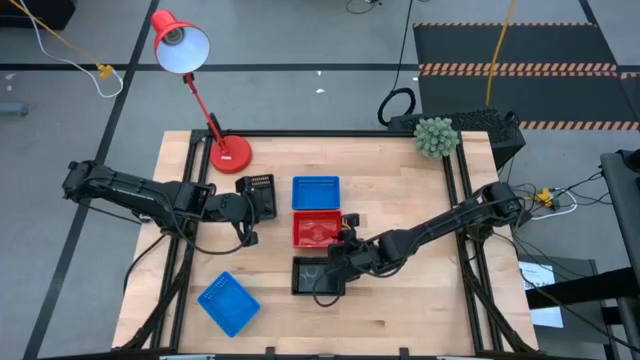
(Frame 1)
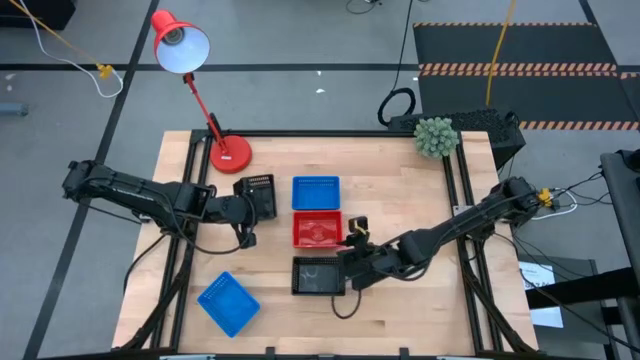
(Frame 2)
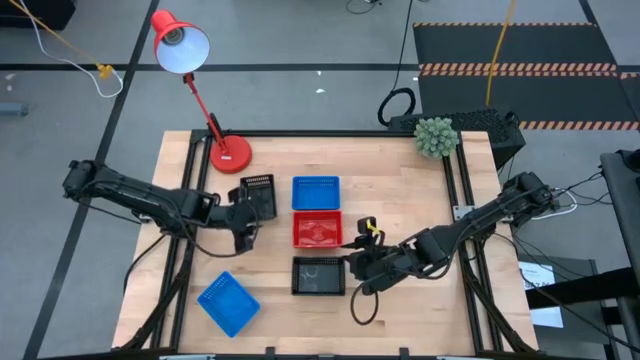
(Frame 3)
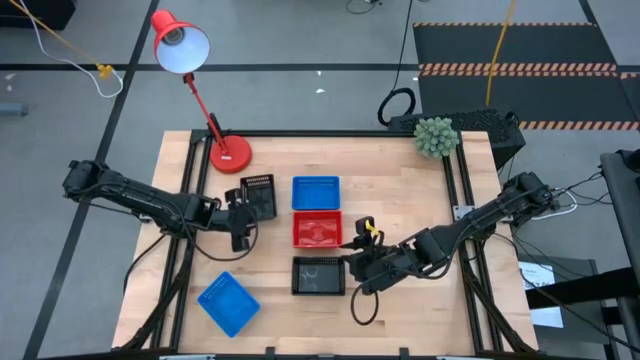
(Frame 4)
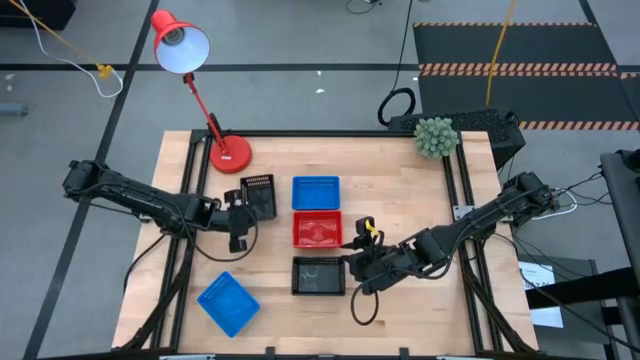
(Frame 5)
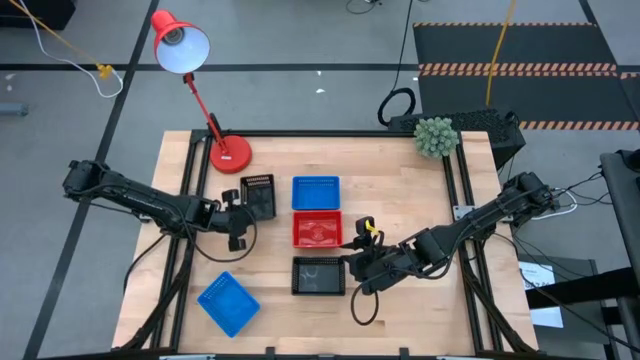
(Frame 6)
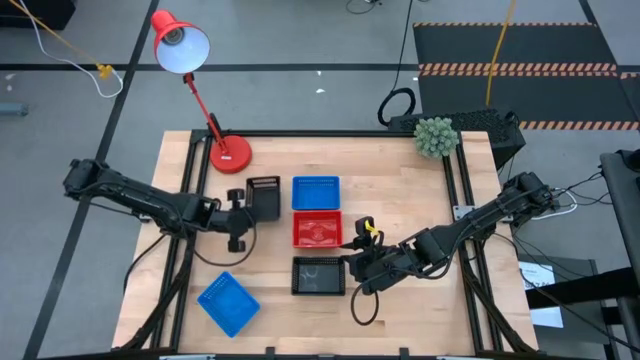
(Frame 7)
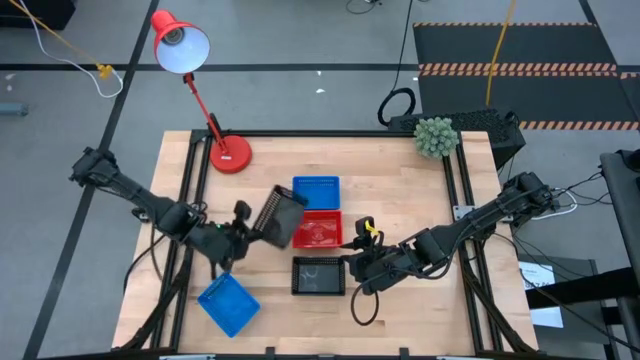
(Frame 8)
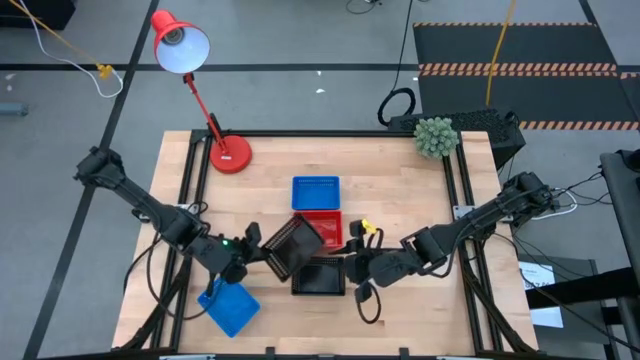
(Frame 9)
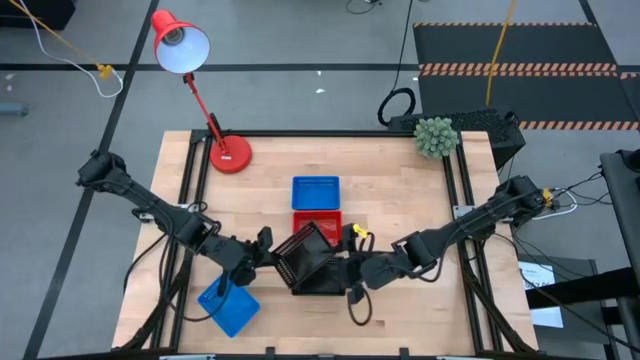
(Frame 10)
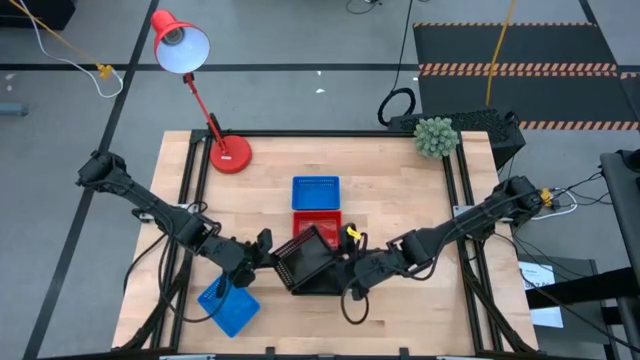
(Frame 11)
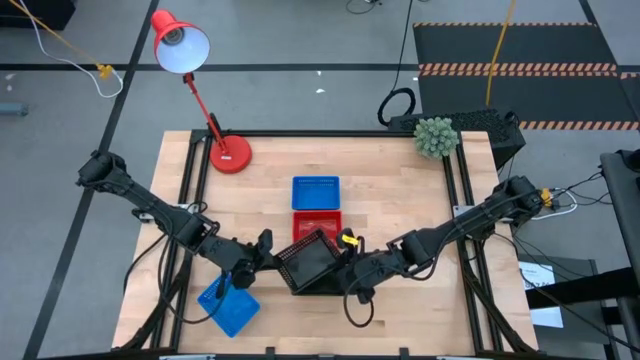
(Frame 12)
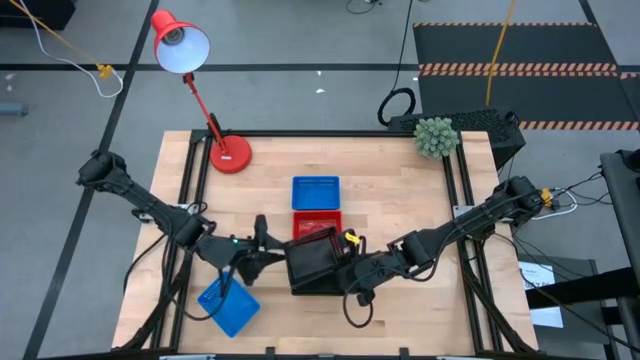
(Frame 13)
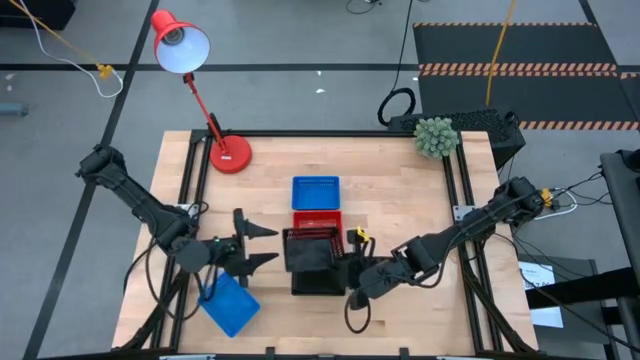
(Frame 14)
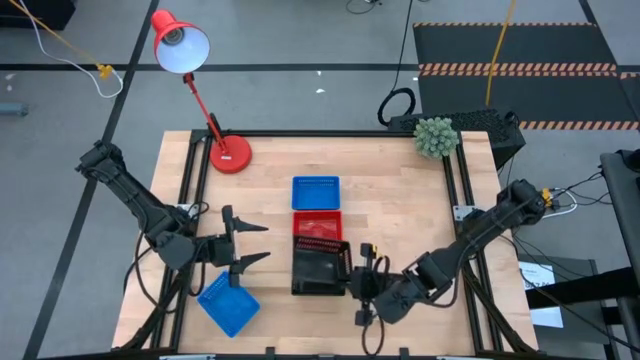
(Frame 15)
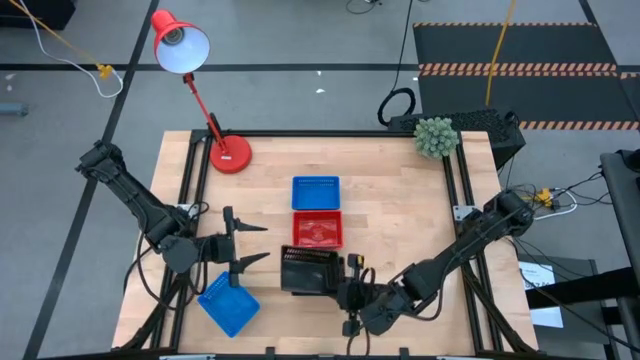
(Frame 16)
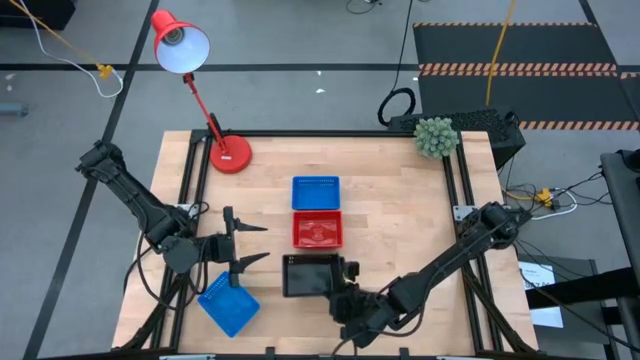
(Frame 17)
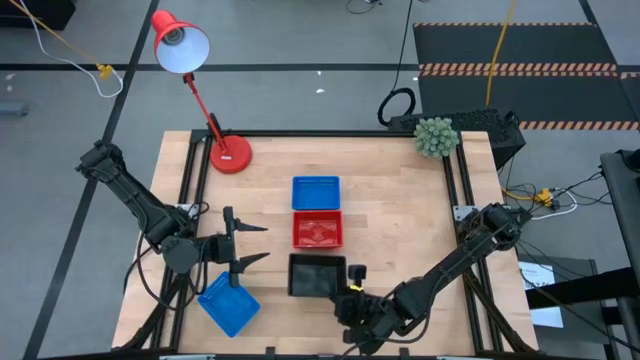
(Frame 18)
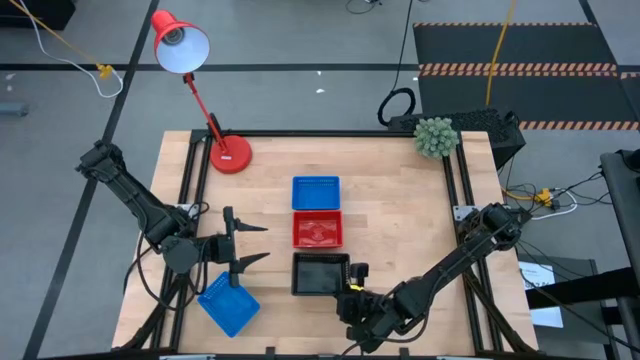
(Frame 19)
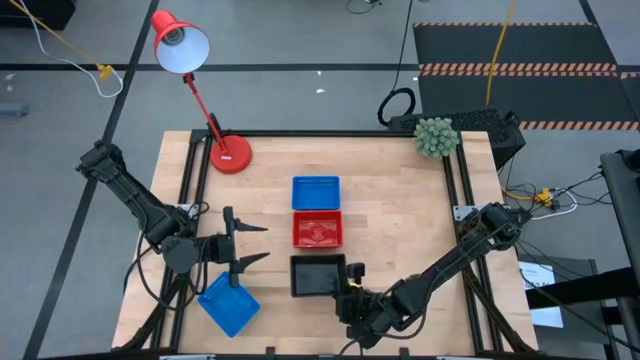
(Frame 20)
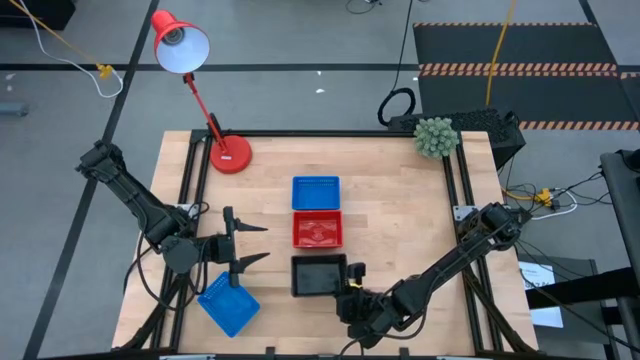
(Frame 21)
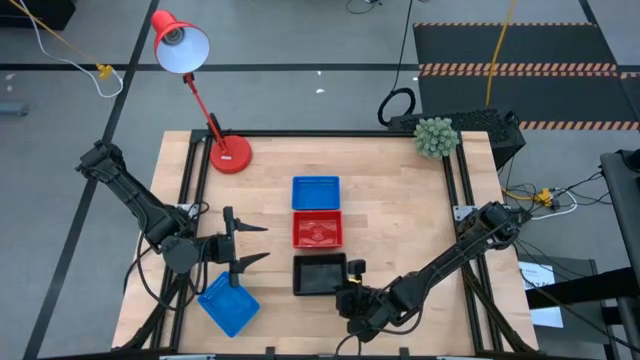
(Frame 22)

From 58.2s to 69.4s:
Stack the top black bin on the bottom stacked black bins

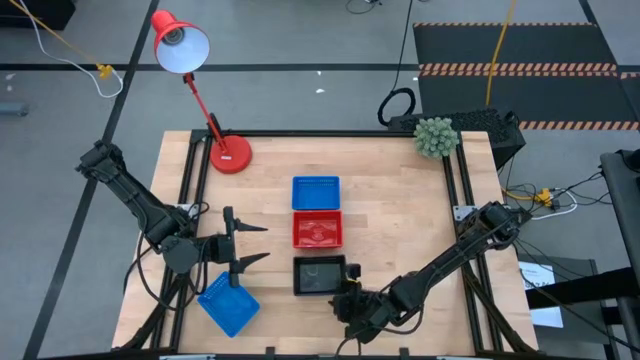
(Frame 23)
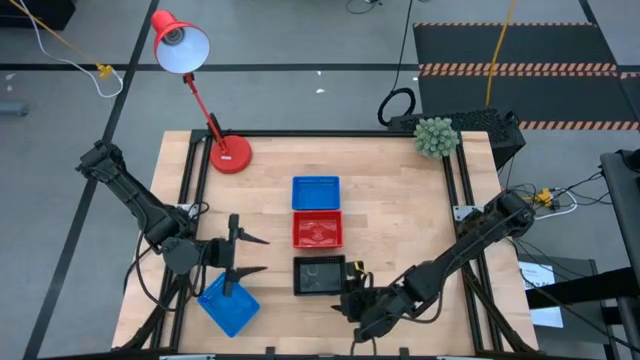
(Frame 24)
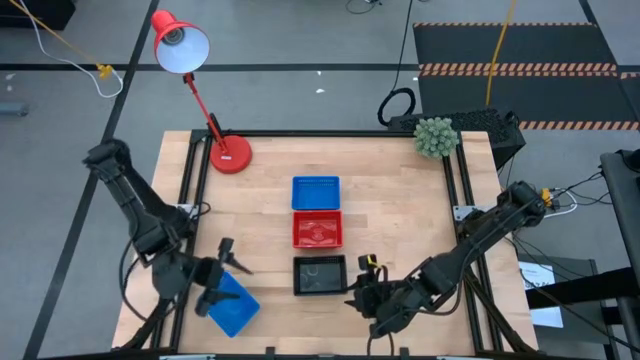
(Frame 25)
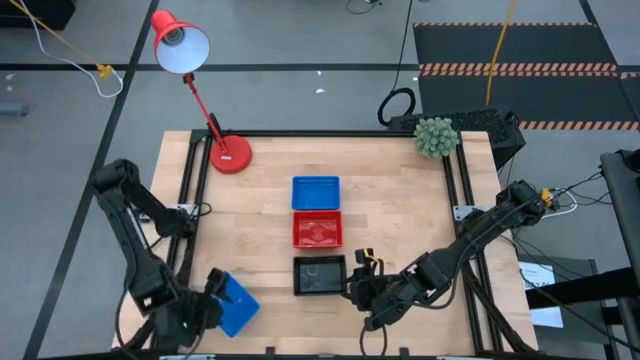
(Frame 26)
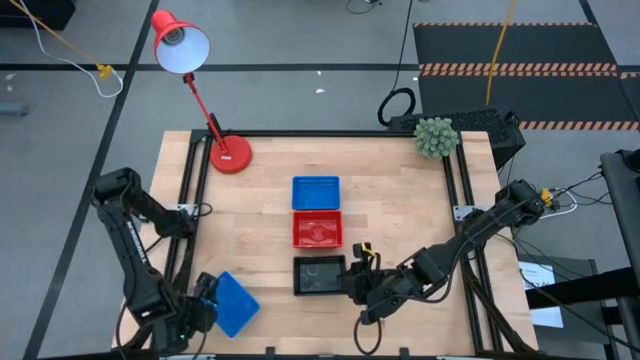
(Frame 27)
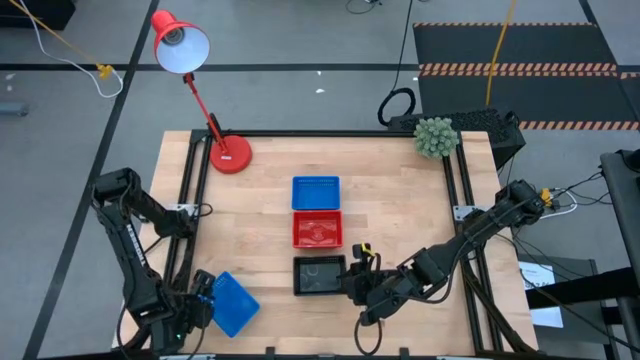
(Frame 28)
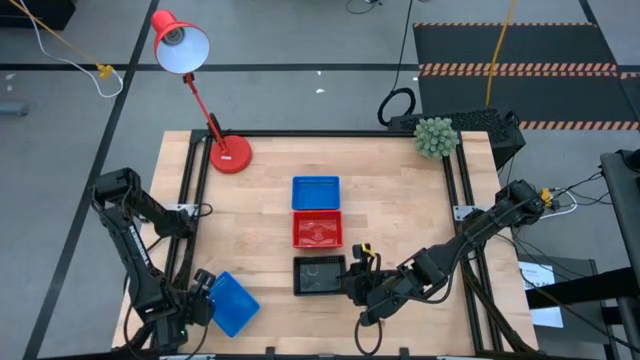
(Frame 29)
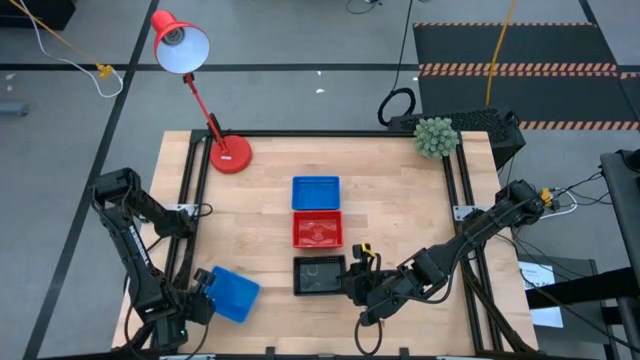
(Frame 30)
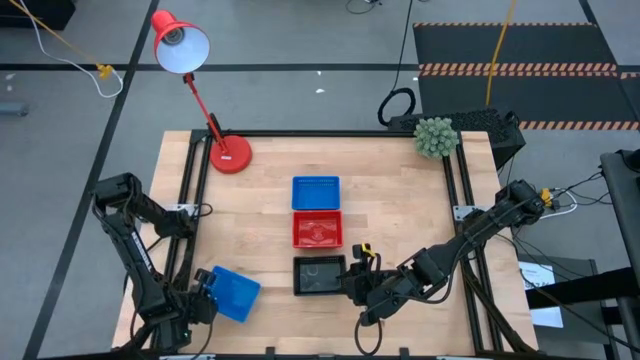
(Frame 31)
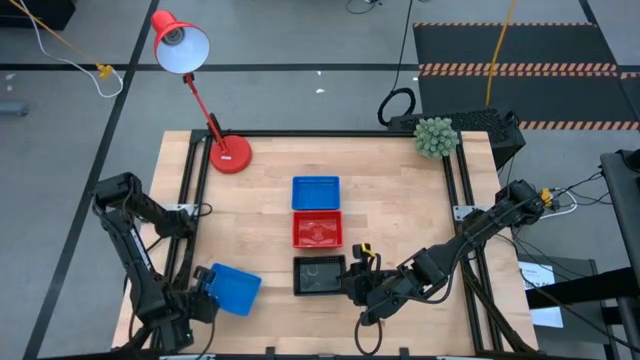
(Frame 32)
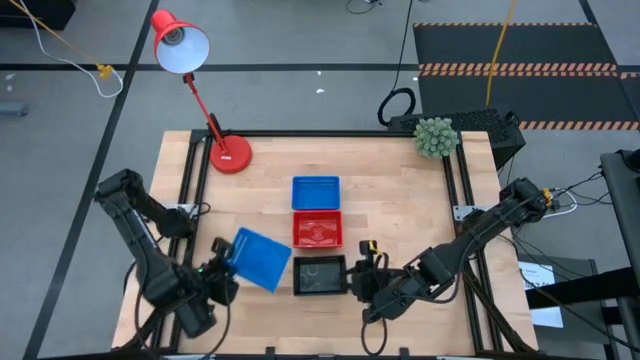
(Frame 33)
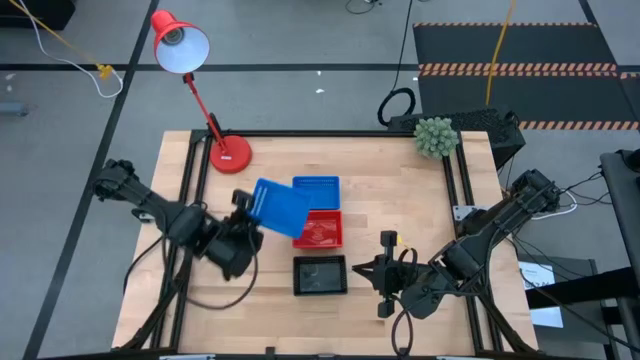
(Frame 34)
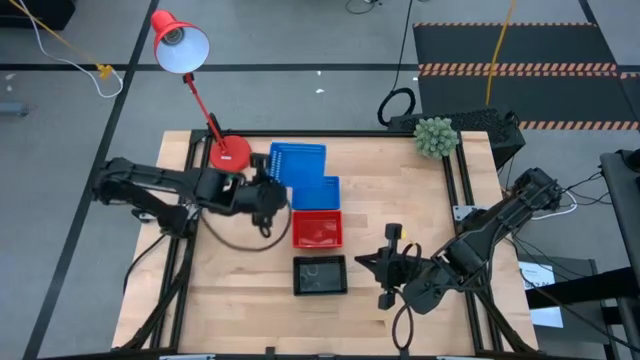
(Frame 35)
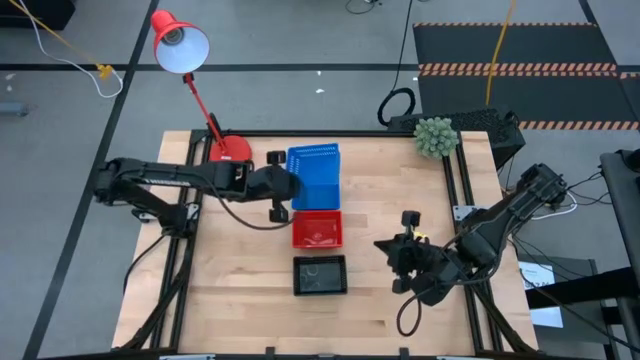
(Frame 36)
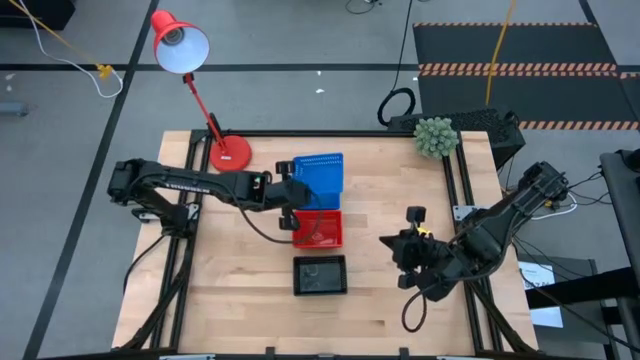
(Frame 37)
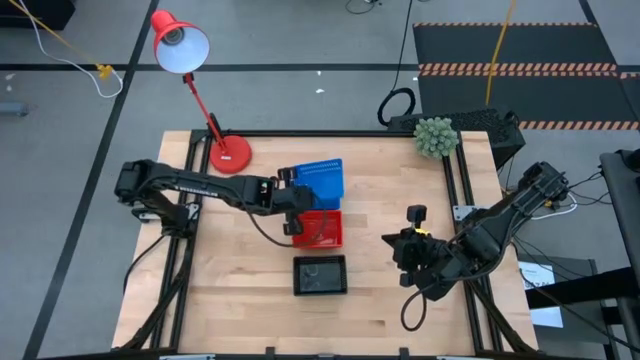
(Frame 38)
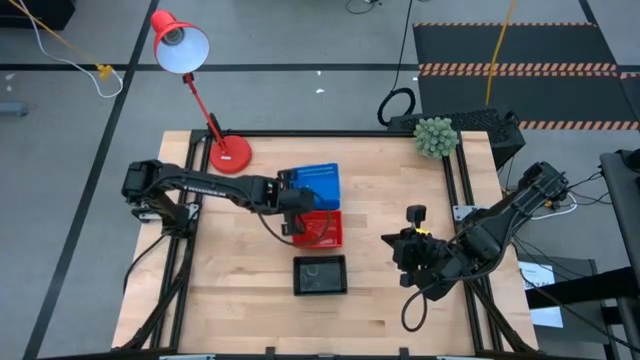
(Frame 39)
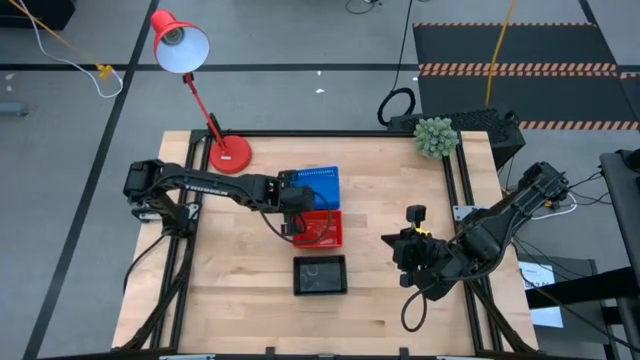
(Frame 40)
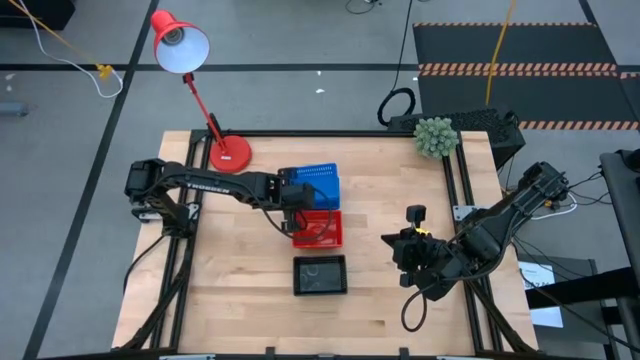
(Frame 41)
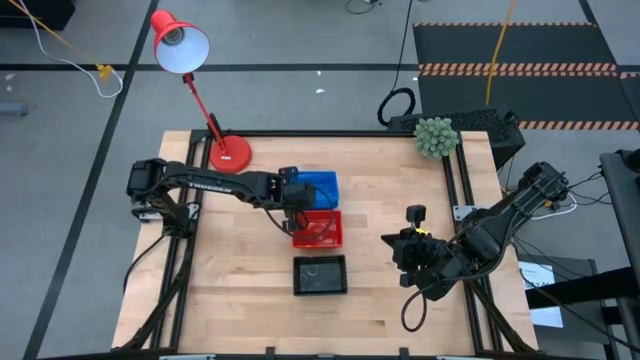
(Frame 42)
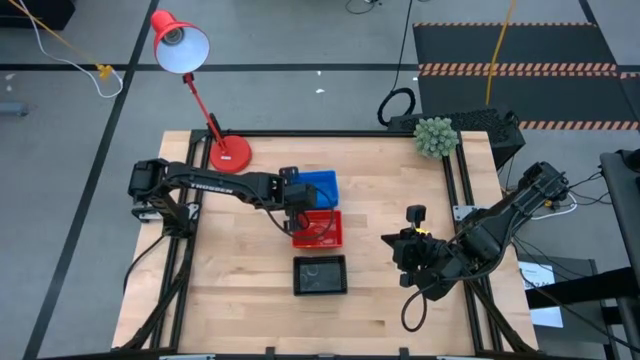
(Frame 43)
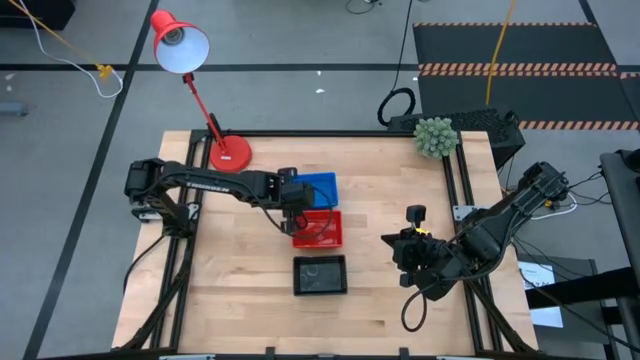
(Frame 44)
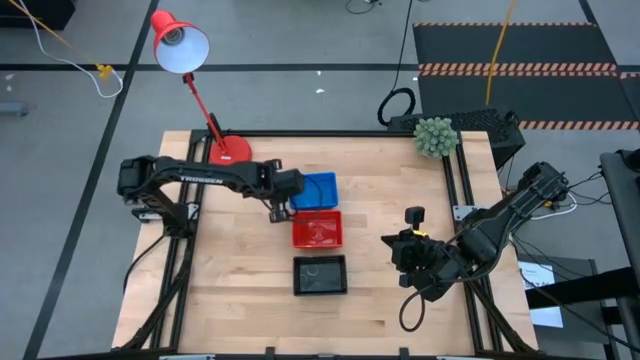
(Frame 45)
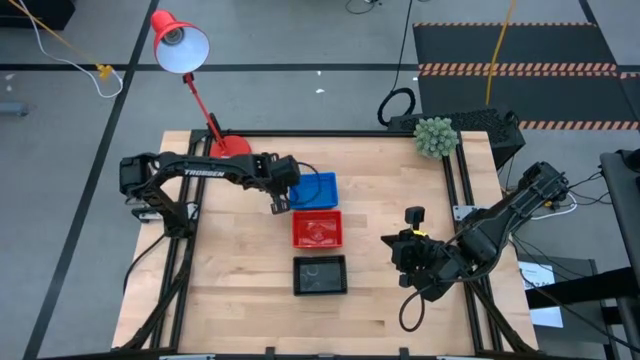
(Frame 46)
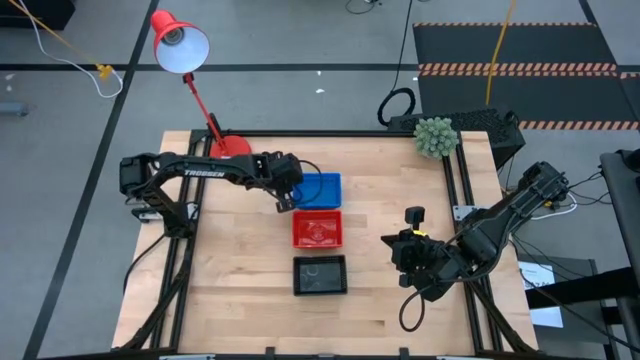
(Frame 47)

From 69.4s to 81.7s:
Stack the bottom blue bin on the top stacked blue bins
